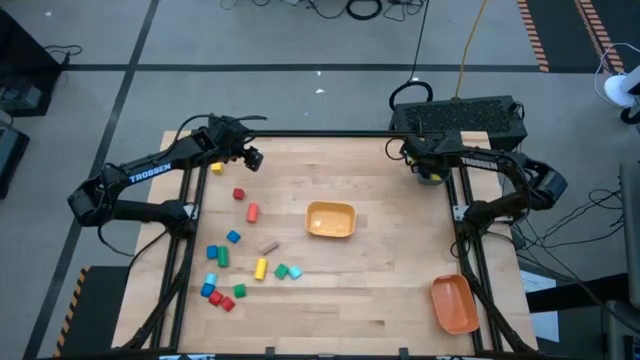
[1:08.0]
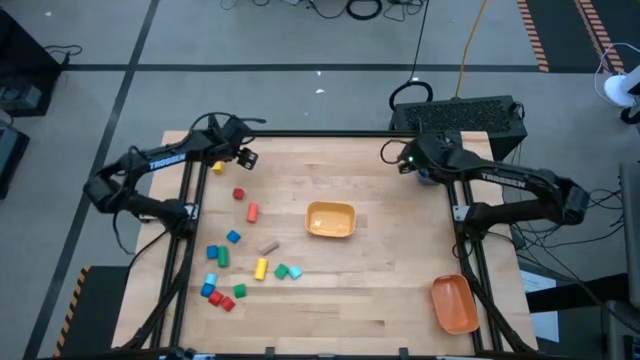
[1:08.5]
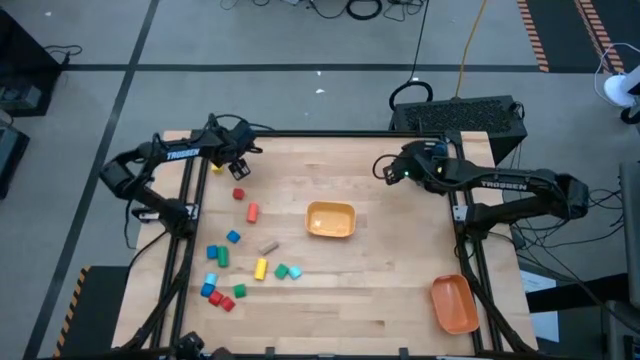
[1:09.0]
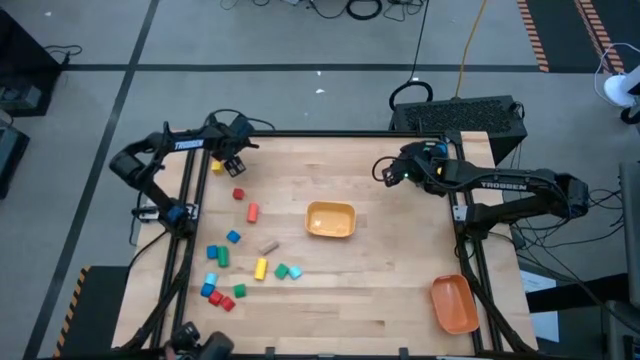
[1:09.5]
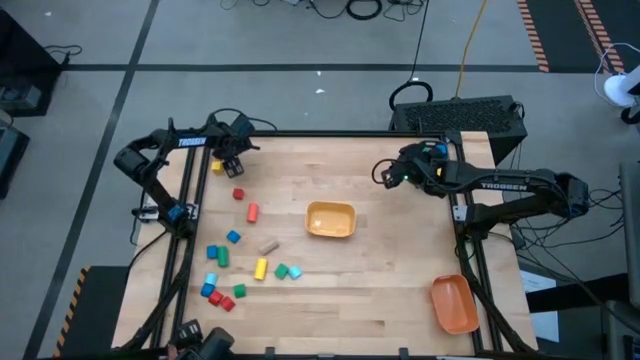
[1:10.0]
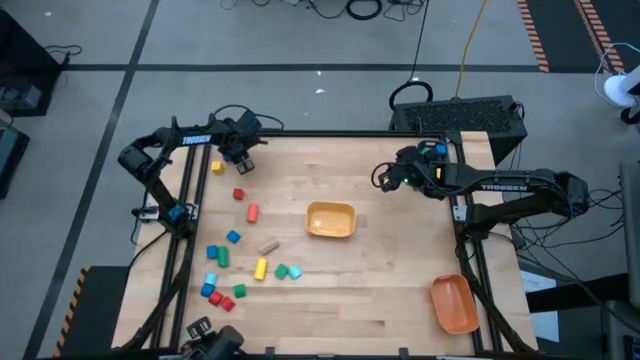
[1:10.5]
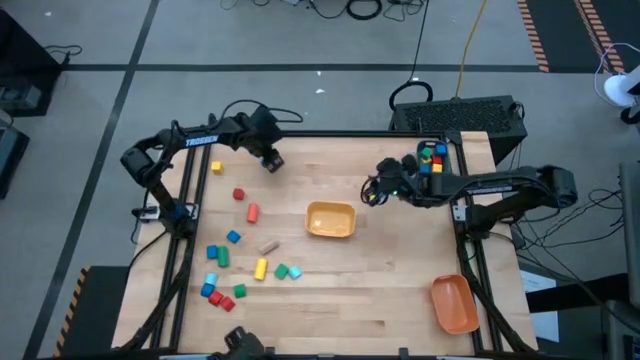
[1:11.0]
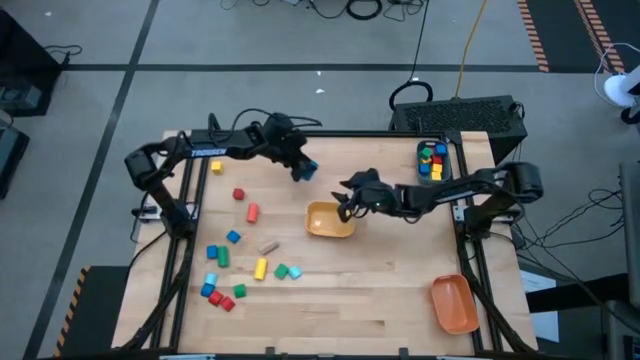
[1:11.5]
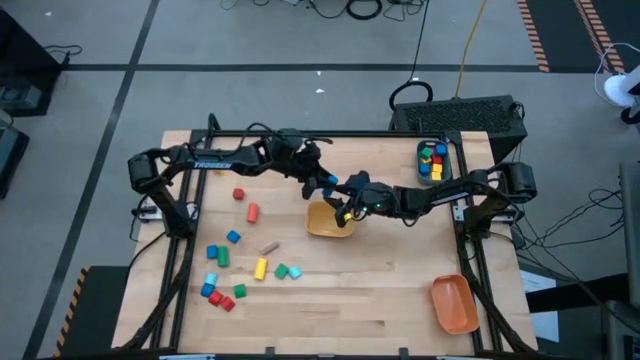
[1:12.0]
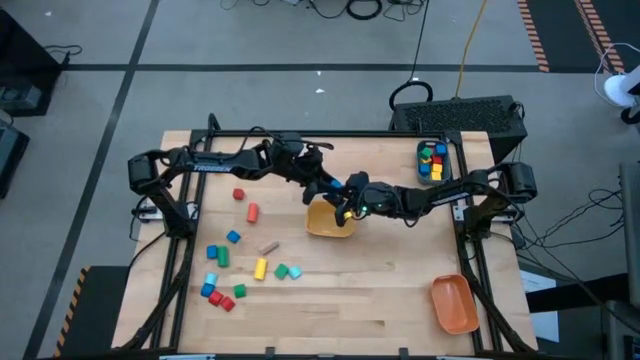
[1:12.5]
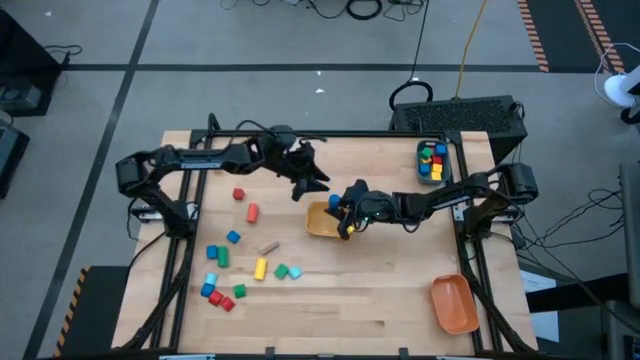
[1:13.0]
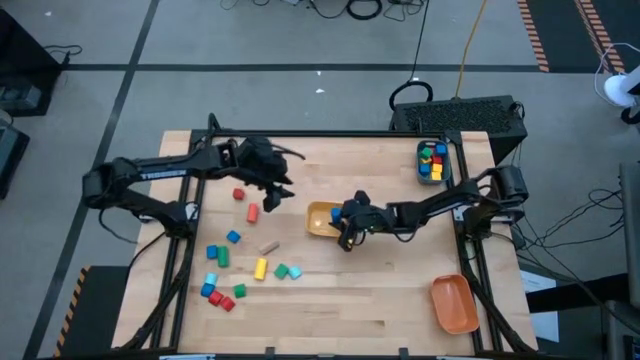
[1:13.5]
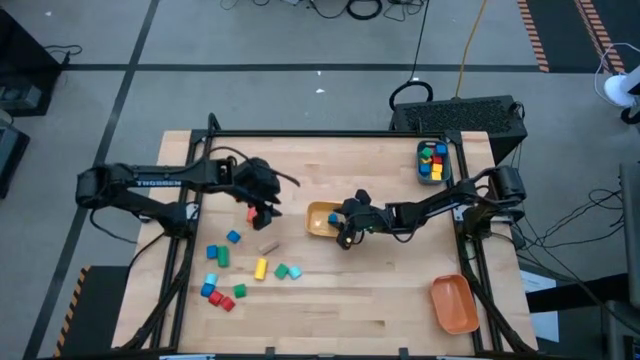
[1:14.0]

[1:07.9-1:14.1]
Task: Sort blocks by size
Put the blue cylindrical block into the yellow bin

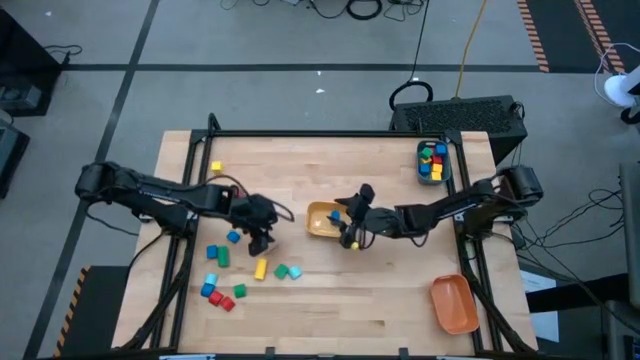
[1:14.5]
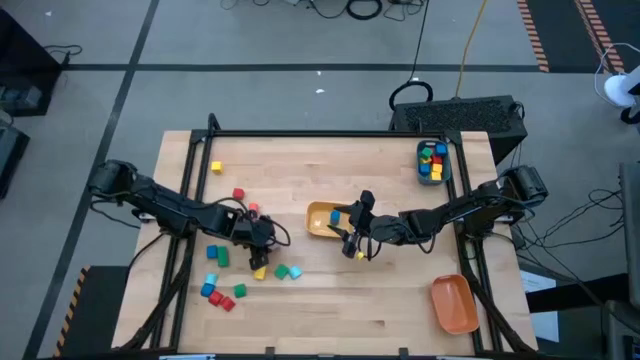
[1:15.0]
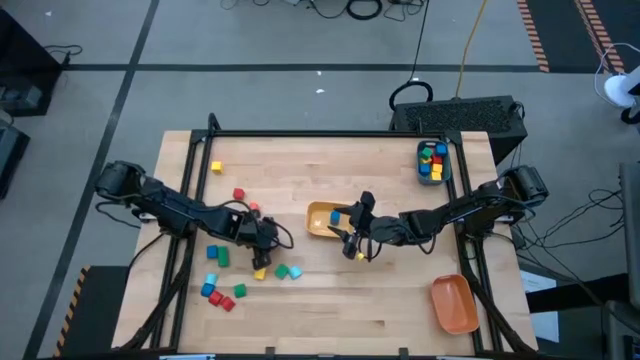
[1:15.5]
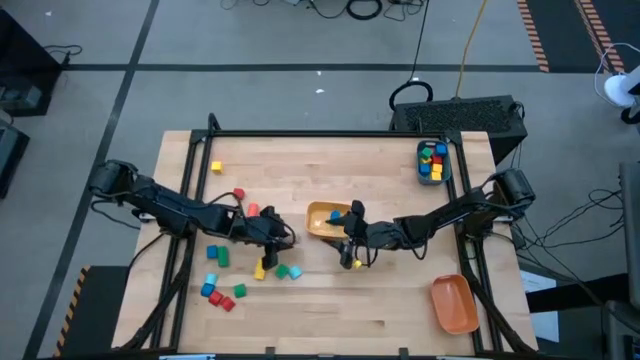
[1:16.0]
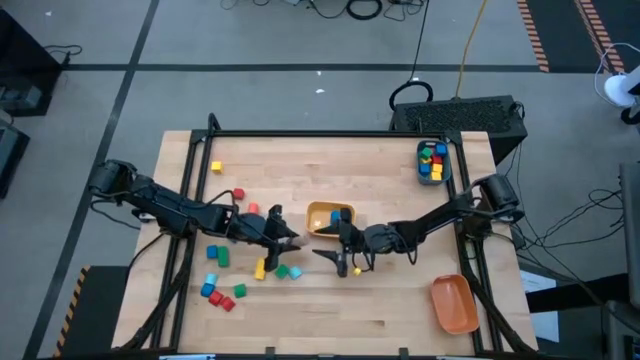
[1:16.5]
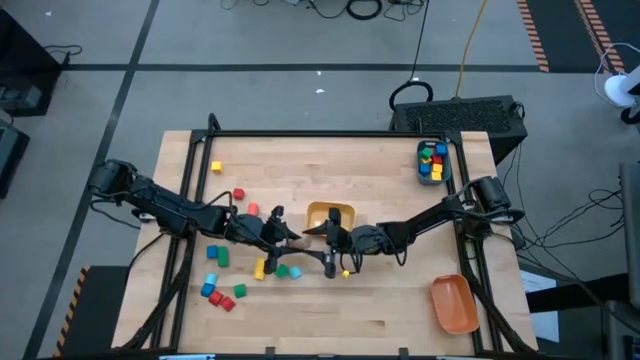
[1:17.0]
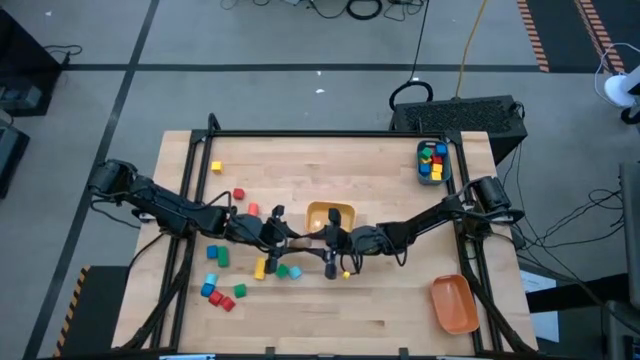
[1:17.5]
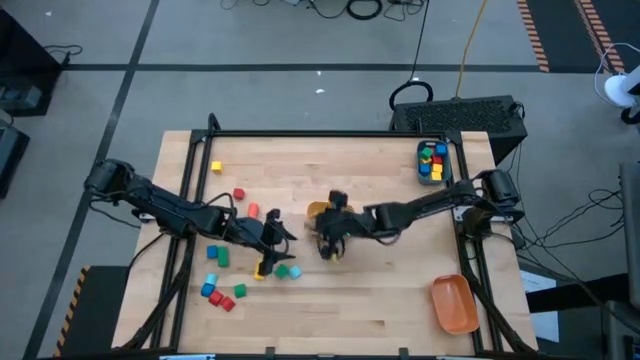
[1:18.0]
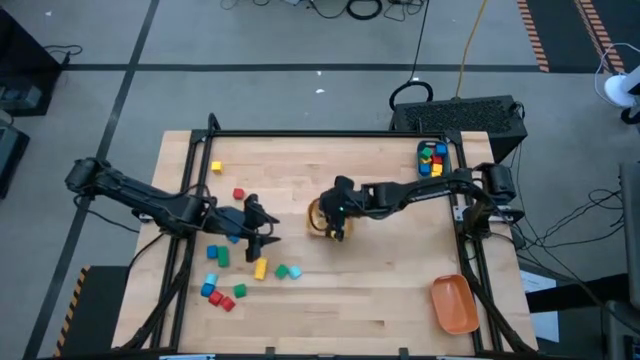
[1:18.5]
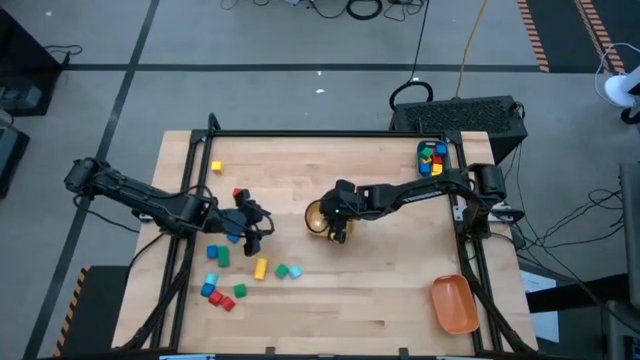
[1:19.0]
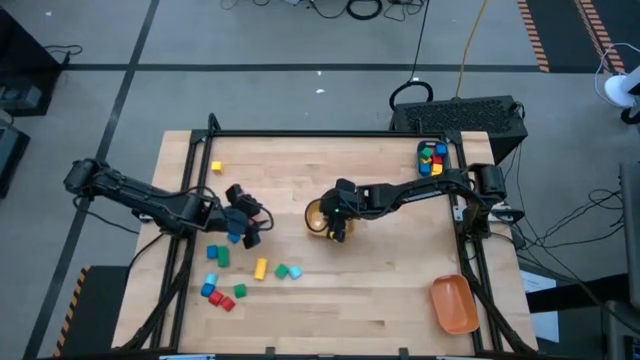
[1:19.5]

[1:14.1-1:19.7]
Put the brown cylindrical block into the yellow bin

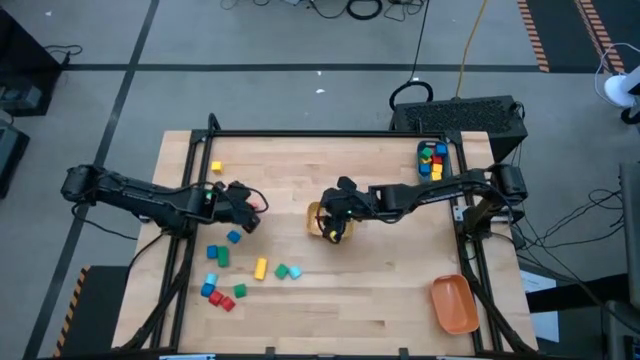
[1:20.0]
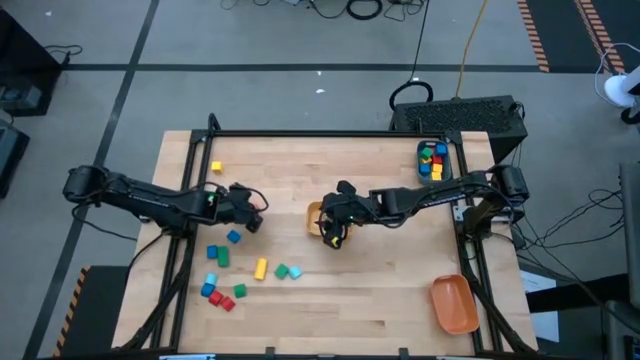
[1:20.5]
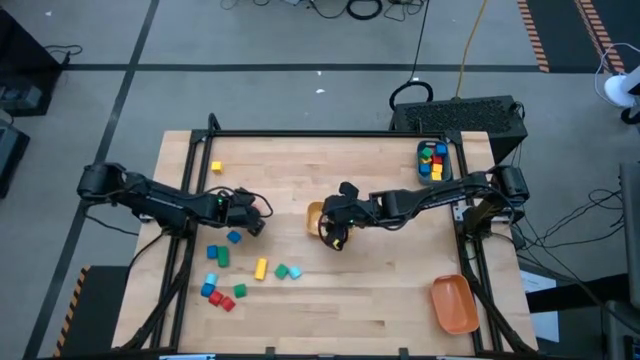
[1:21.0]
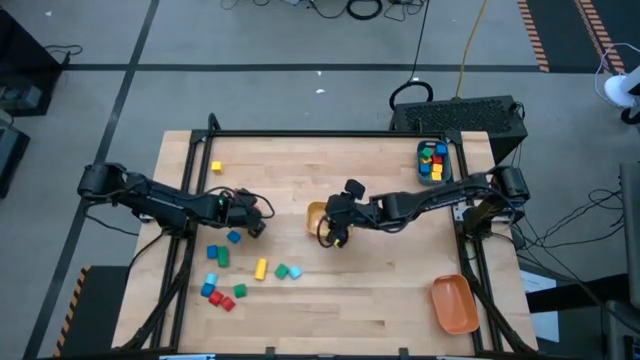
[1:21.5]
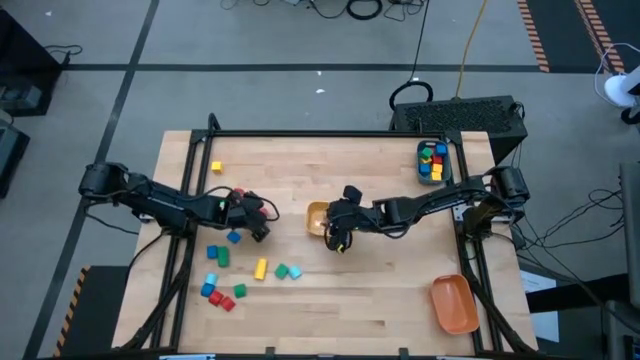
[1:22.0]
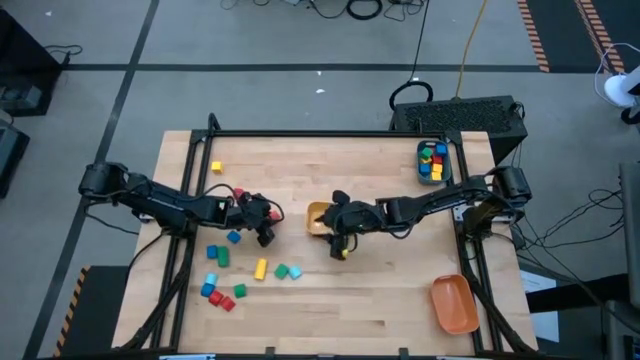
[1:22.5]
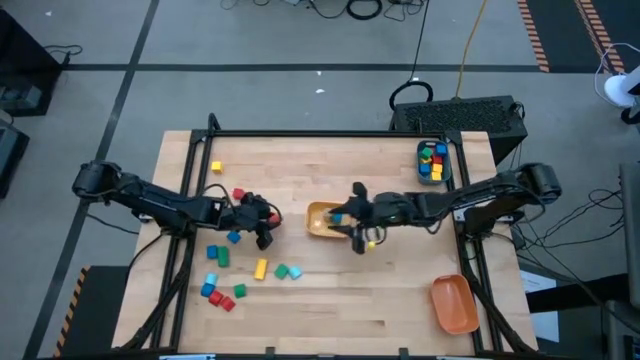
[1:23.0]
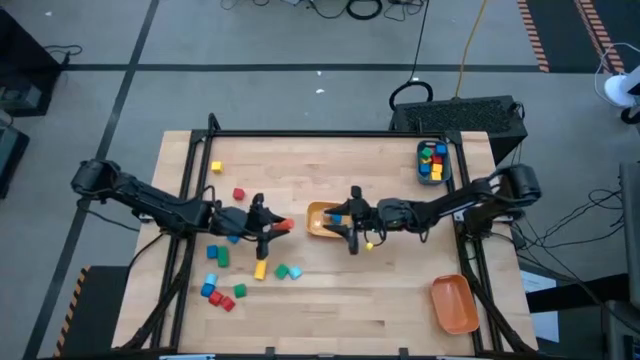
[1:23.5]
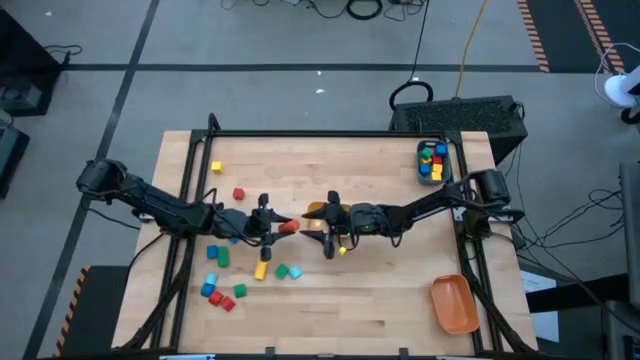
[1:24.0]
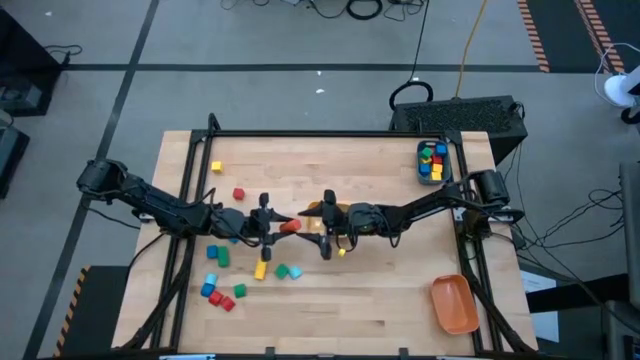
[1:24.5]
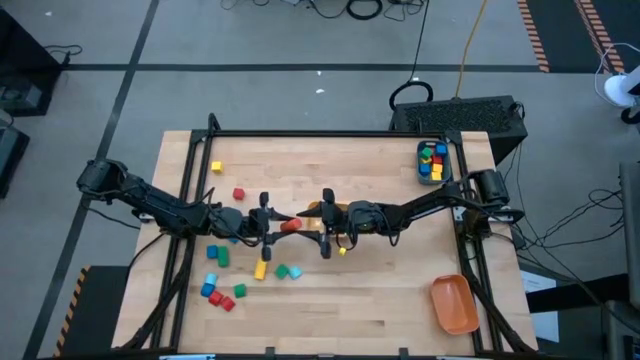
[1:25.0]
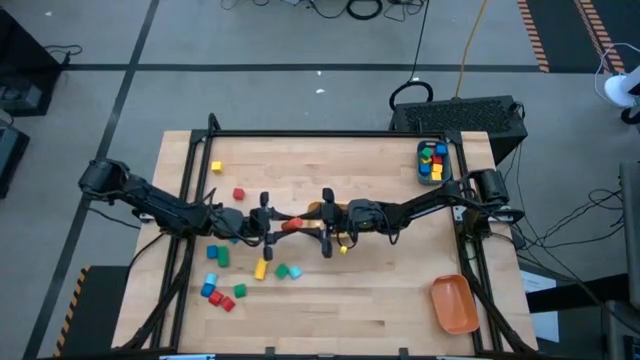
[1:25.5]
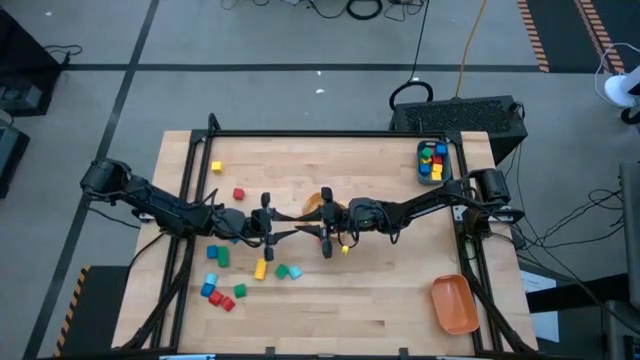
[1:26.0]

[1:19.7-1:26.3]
Put the orange cylindrical block into the yellow bin

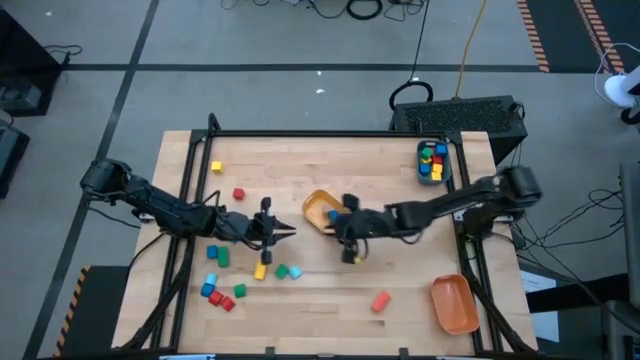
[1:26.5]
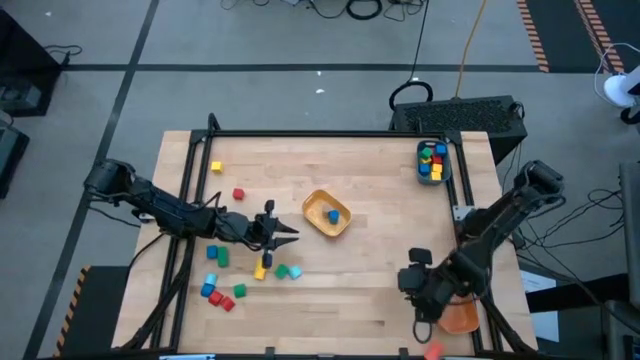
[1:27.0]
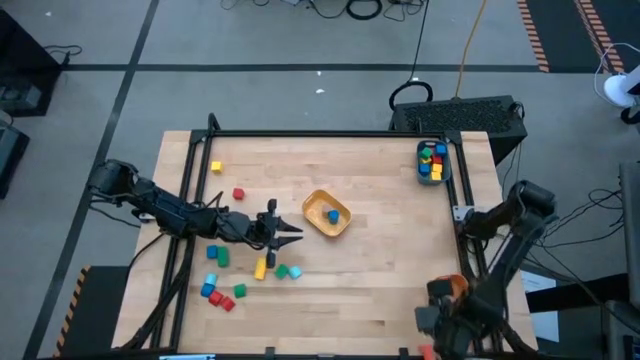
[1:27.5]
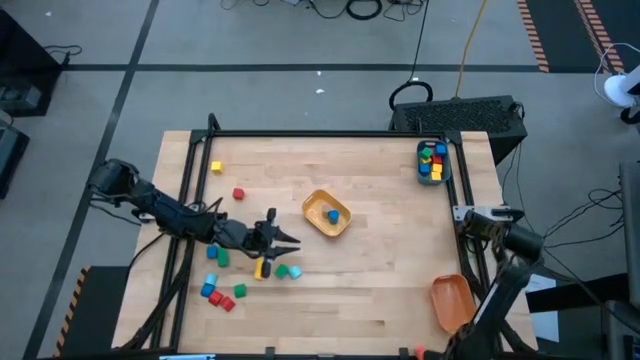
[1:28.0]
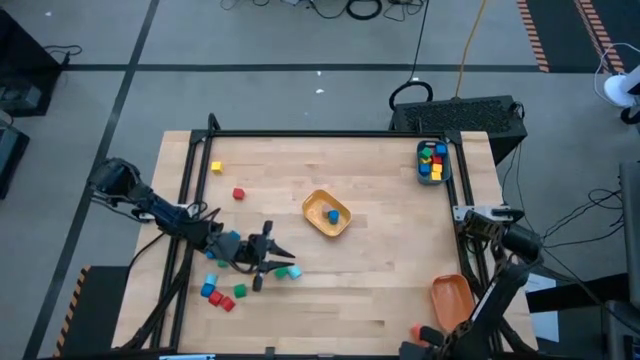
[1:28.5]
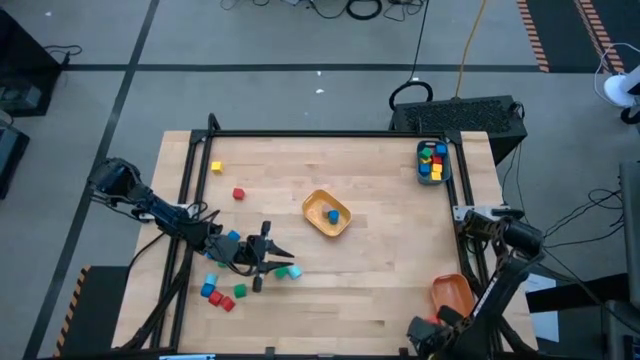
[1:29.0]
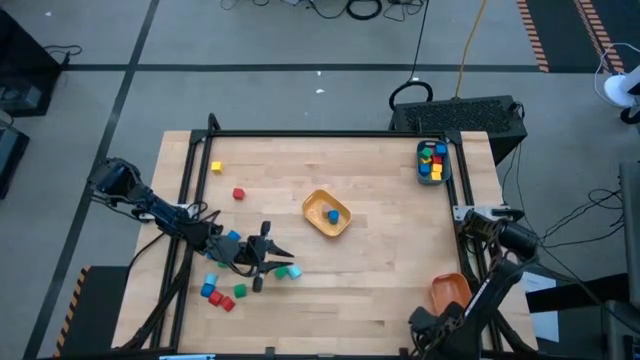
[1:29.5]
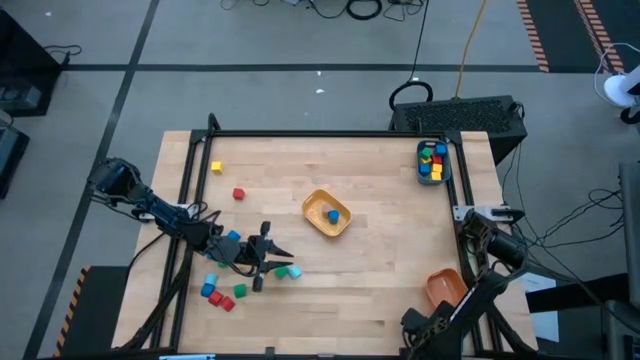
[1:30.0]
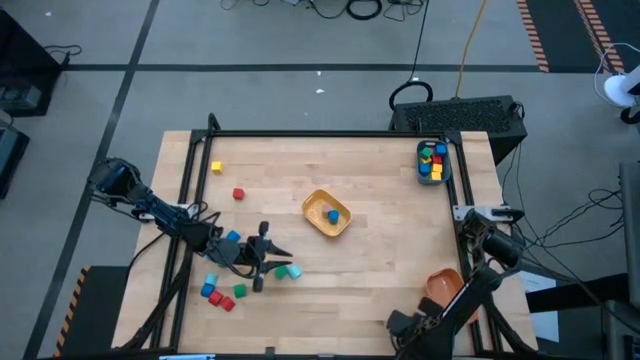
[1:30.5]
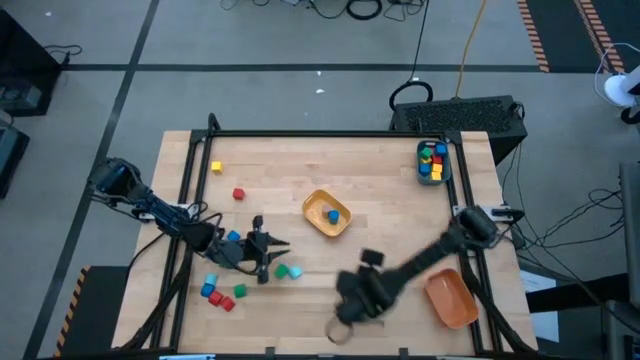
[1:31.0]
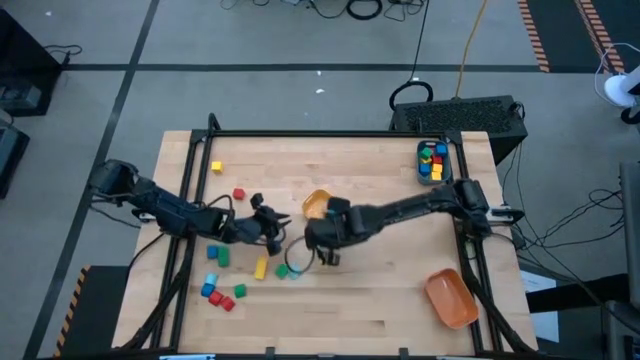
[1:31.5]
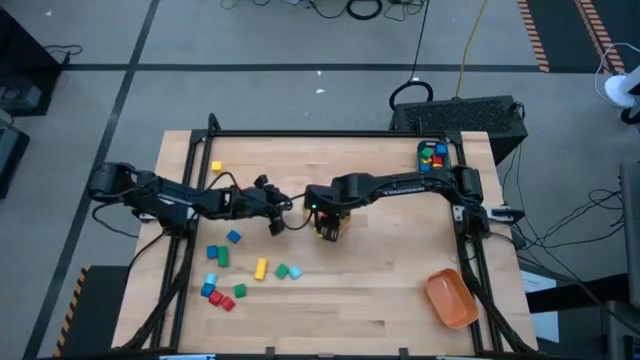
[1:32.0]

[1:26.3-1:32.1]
Put the orange cylindrical block into the yellow bin
